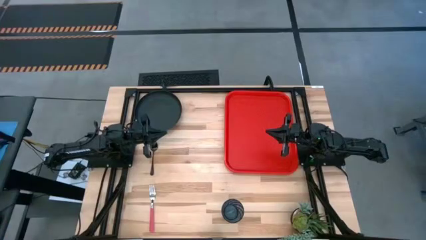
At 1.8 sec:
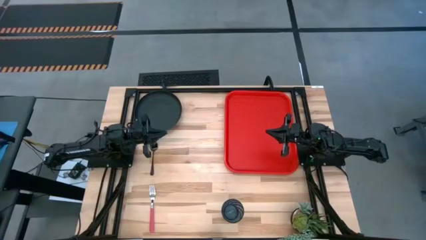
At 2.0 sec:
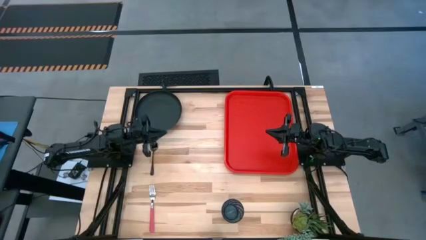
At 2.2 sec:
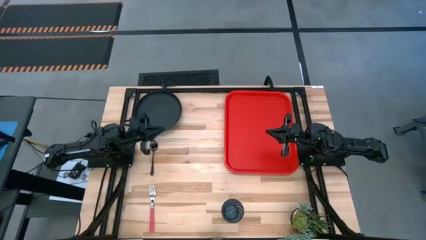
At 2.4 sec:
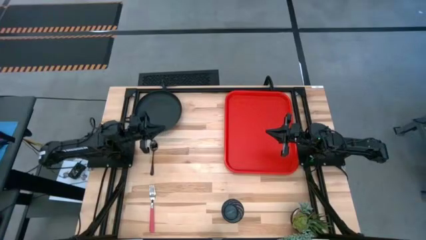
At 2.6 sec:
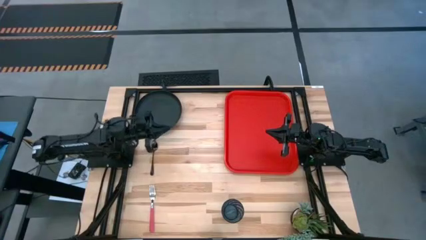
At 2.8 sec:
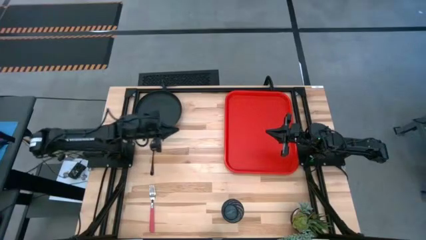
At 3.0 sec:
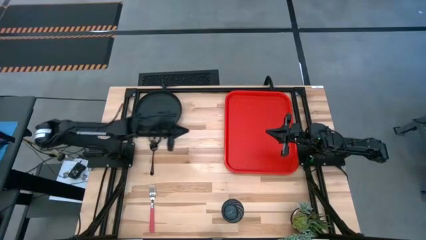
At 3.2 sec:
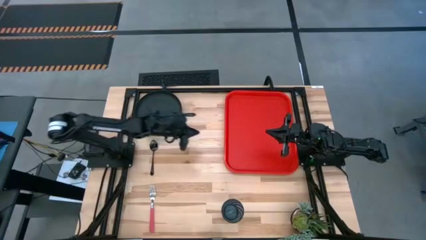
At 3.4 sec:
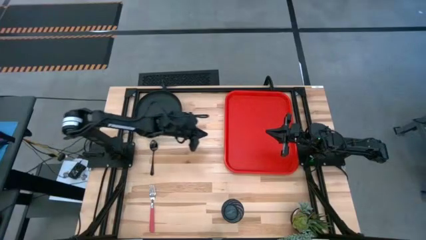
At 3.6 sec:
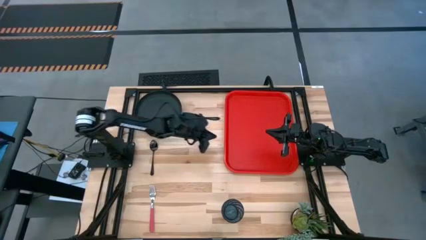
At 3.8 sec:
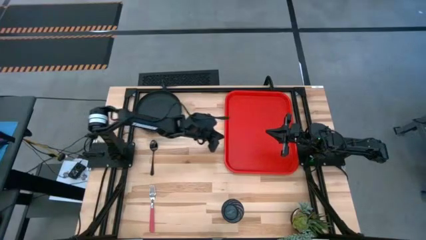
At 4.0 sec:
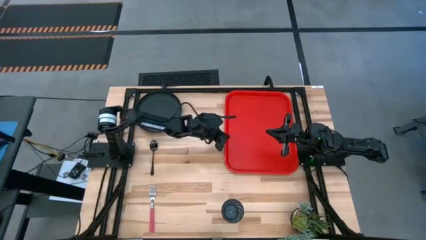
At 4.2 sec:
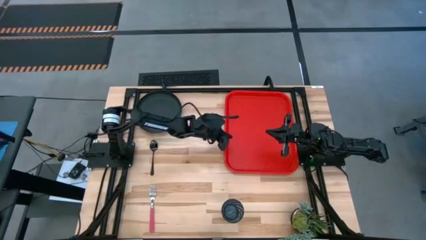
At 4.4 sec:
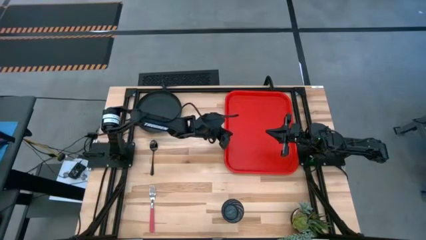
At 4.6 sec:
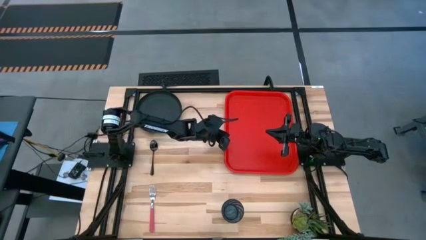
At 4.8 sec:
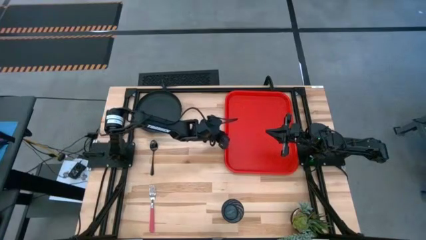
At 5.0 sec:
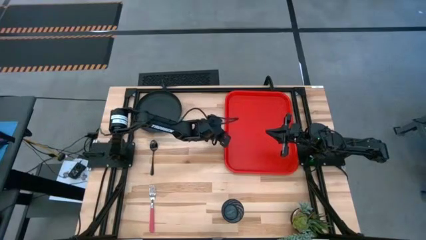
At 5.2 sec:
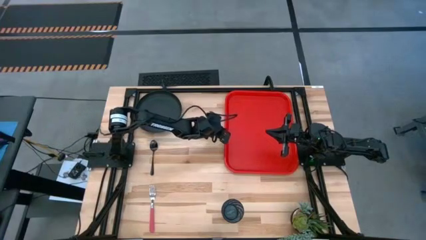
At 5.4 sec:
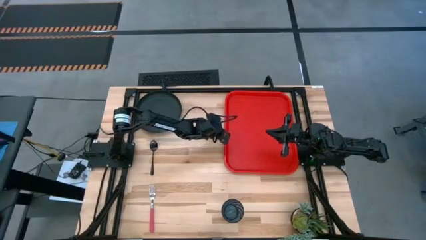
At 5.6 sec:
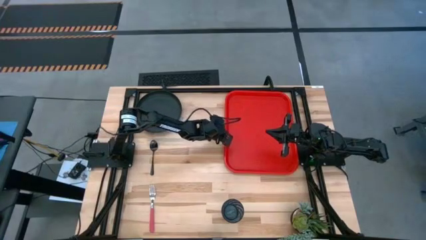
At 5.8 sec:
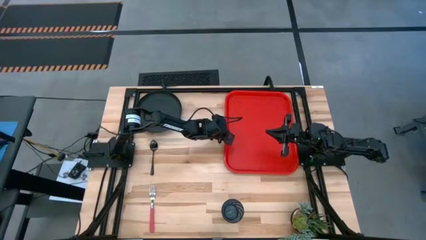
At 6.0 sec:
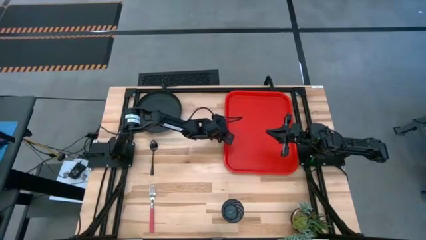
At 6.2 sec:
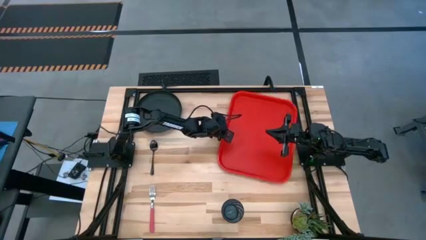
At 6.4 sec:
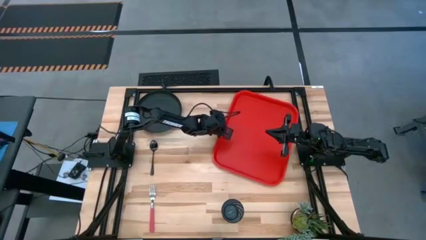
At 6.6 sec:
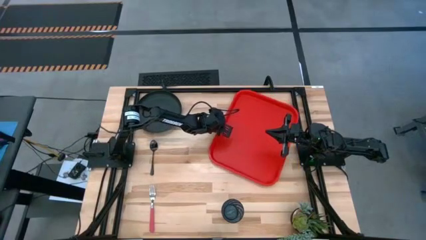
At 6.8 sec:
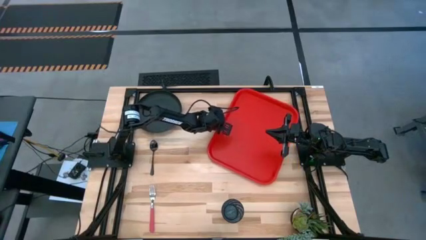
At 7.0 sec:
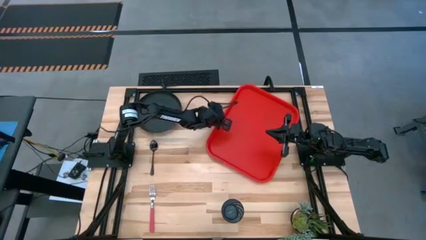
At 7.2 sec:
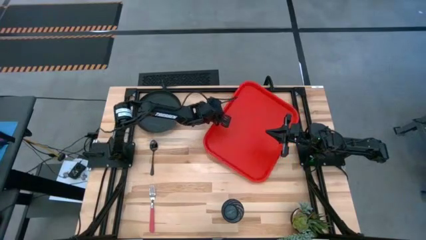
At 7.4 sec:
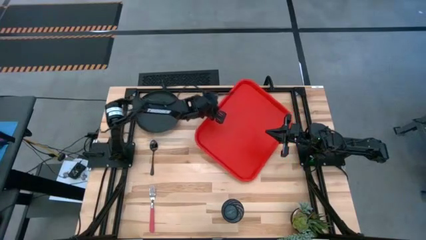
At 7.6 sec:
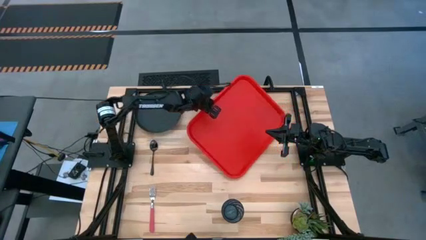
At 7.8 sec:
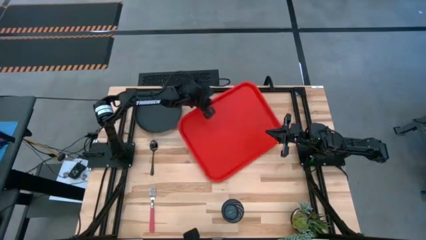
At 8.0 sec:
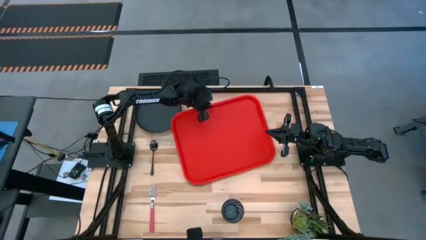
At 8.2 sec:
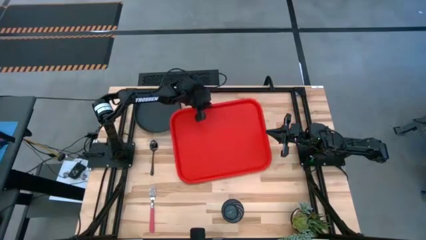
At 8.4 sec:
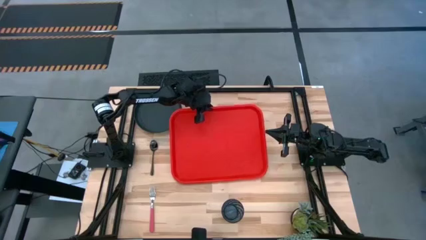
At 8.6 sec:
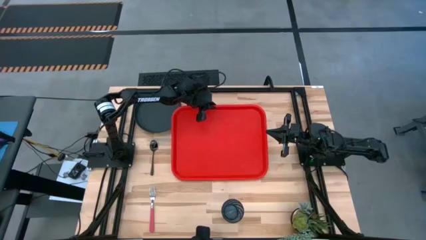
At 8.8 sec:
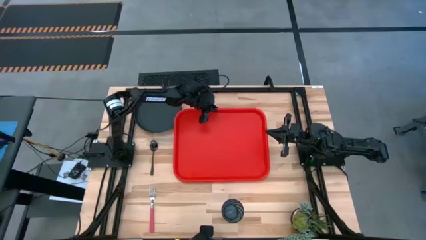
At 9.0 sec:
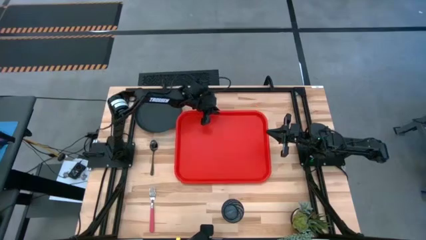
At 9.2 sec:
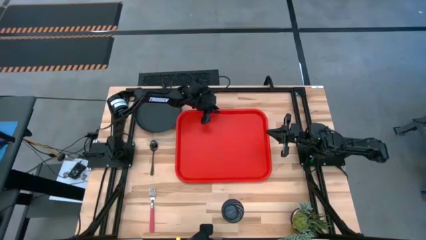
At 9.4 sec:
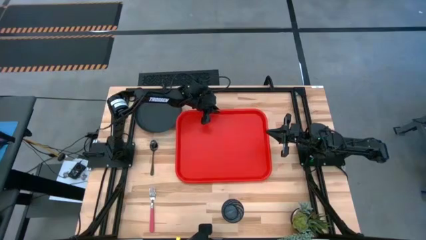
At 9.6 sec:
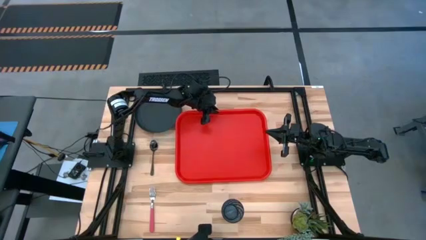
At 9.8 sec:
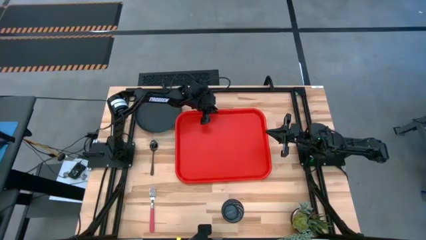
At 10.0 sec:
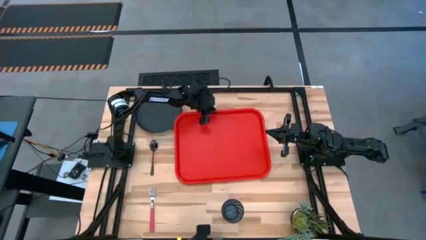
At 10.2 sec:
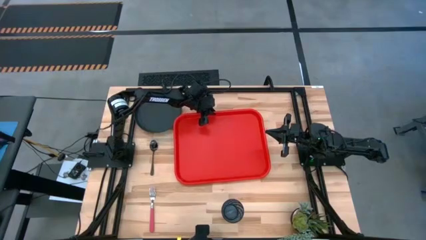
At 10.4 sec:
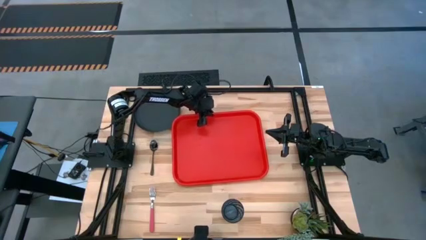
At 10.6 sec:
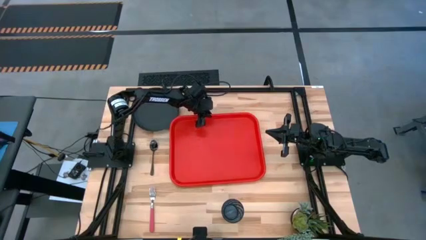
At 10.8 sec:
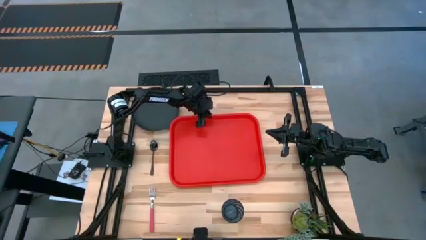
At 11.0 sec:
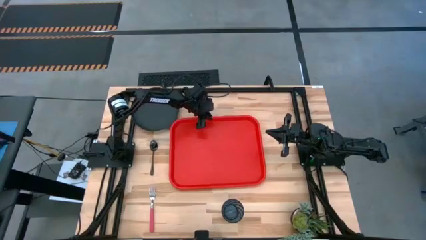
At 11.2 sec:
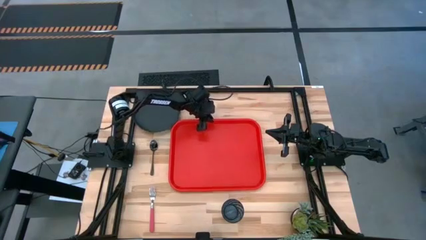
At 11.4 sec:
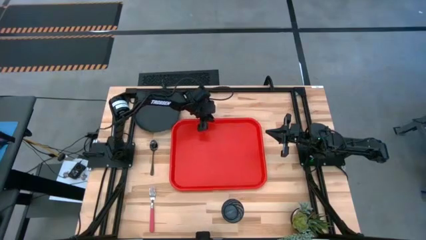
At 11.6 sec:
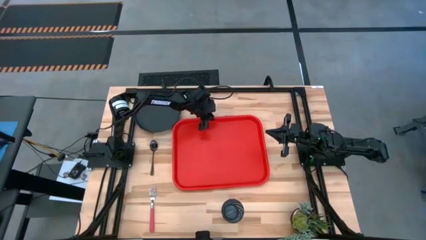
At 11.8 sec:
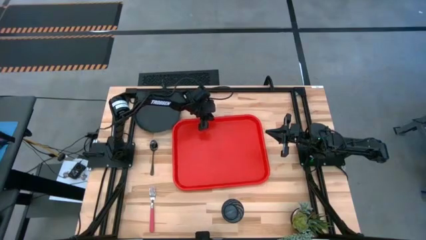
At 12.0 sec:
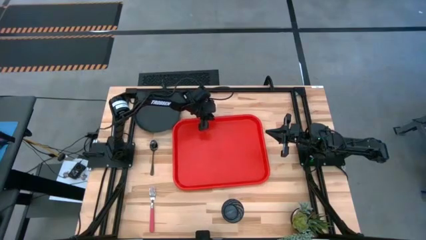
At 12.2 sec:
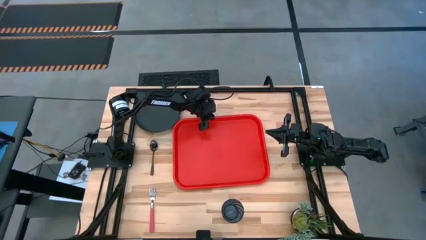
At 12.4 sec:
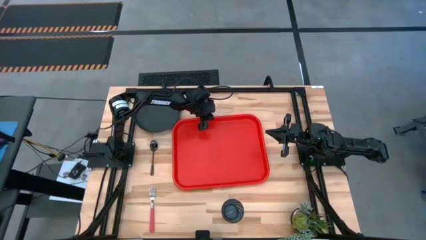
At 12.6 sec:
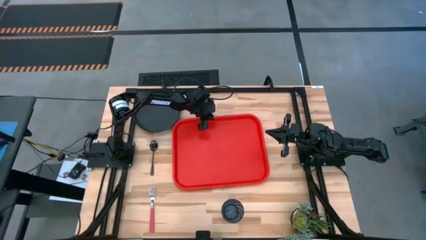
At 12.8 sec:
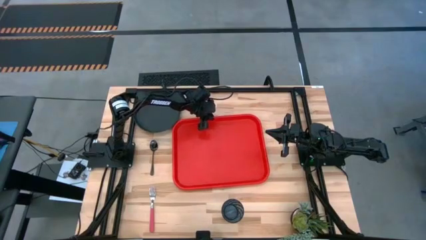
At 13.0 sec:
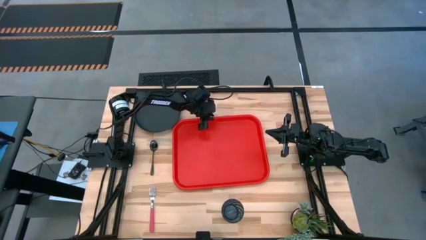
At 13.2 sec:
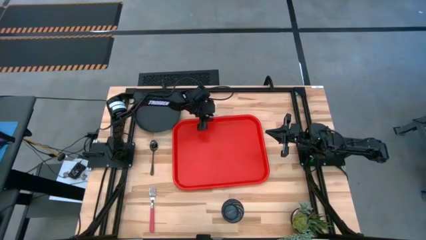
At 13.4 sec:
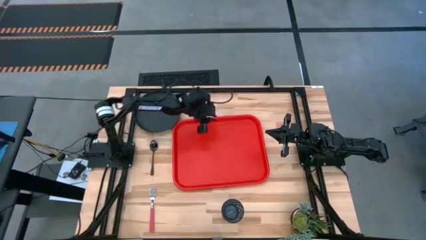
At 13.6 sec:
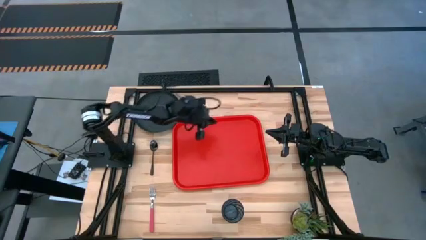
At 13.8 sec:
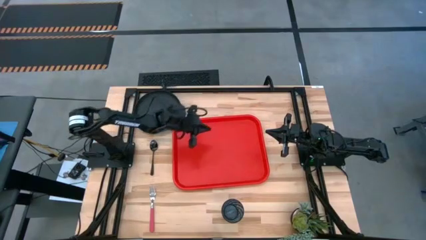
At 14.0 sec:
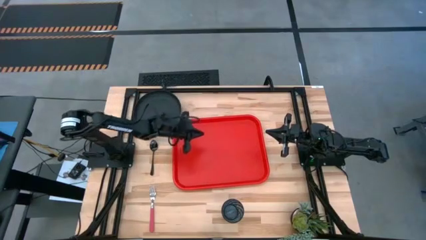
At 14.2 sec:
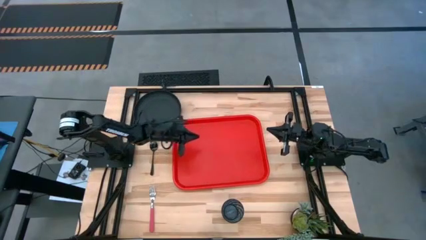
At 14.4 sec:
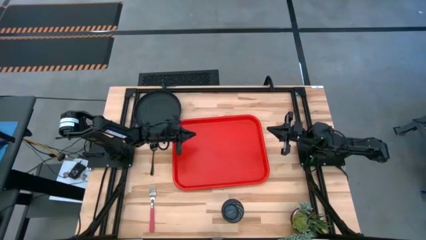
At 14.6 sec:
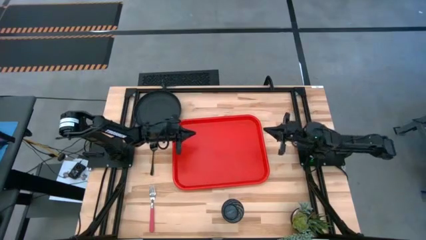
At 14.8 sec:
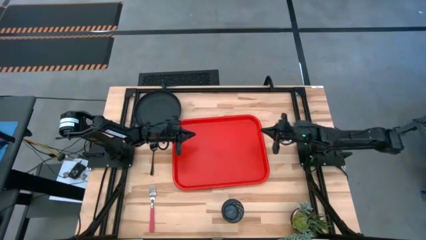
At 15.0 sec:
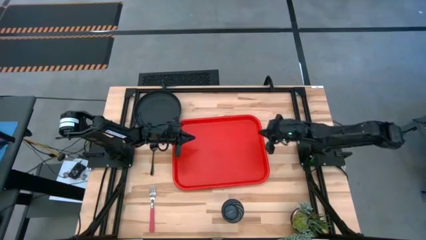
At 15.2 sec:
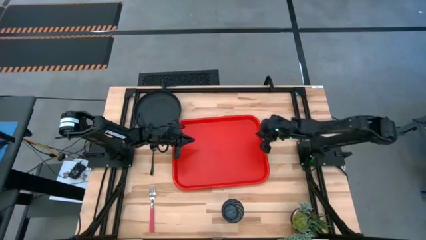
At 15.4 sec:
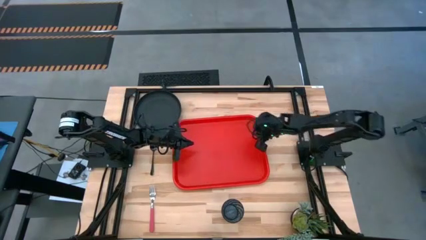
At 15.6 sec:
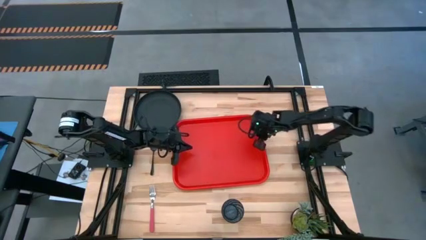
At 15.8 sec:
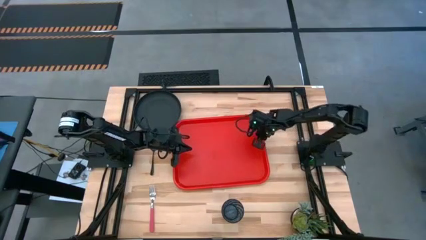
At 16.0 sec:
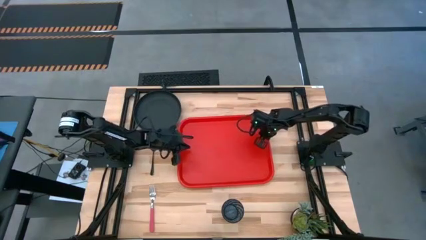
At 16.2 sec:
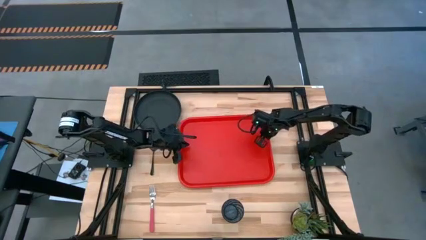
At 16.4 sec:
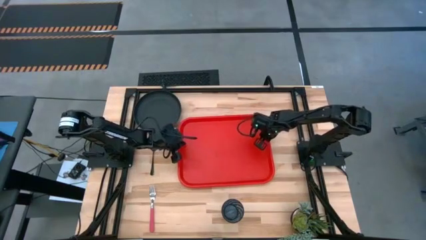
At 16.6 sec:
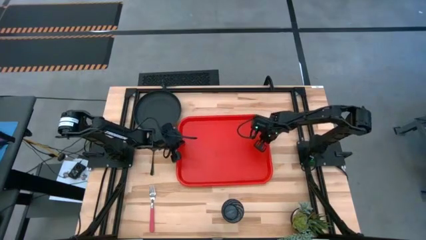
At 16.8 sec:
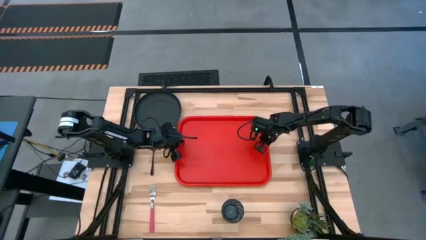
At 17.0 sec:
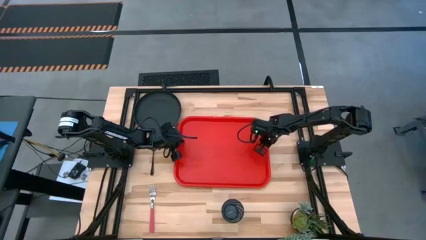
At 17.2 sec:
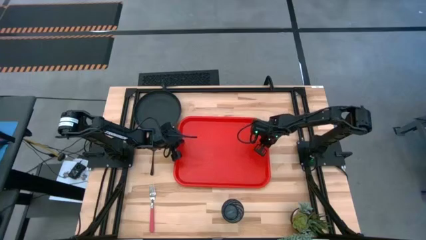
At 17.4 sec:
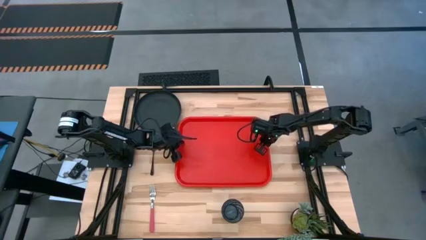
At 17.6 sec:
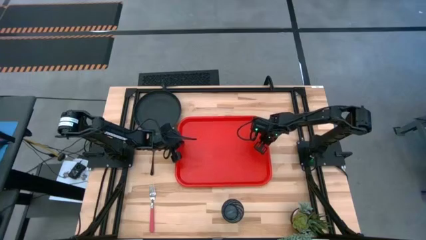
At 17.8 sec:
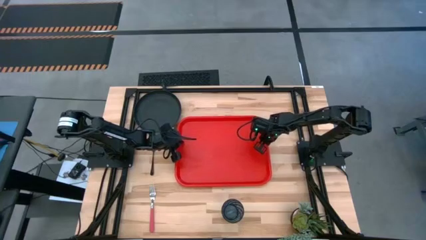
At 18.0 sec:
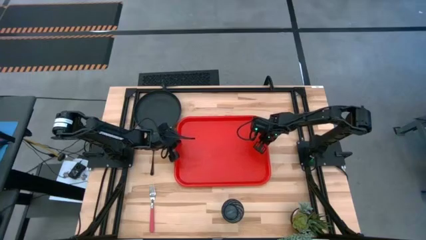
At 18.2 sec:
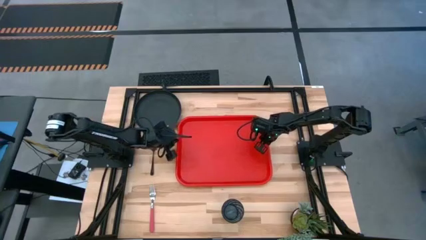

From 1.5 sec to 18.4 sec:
Task: Pick and place plate/cup/fork/spoon on tray
Prepare the red serving tray
